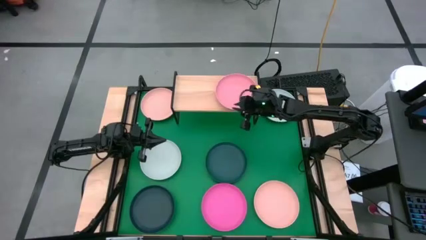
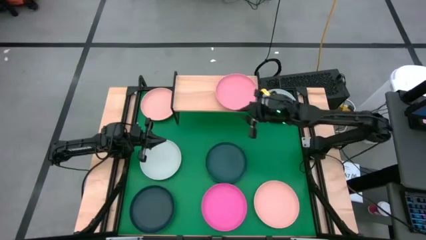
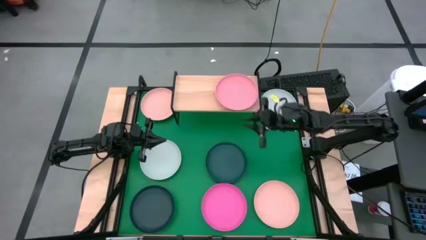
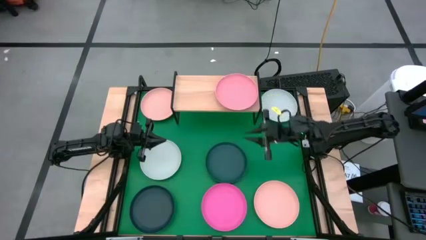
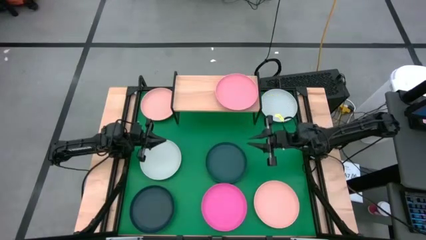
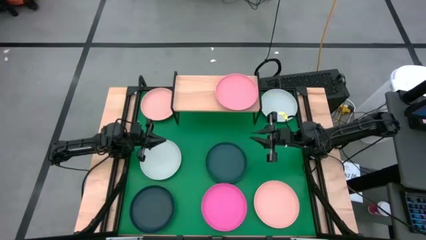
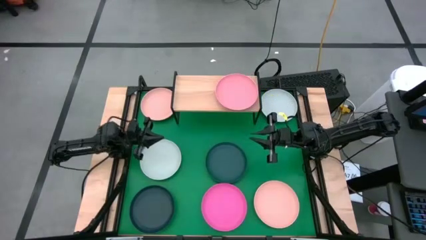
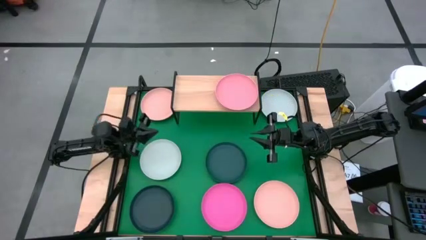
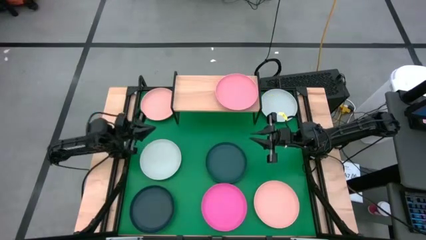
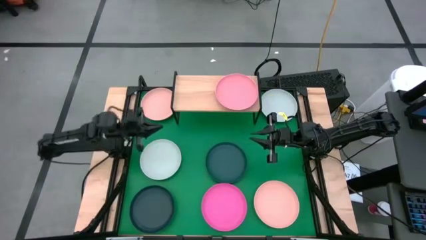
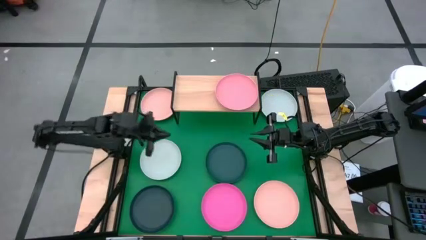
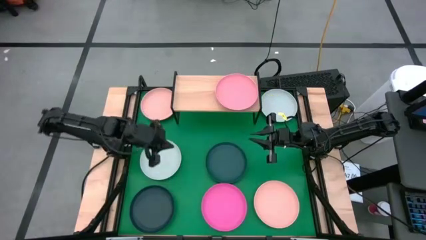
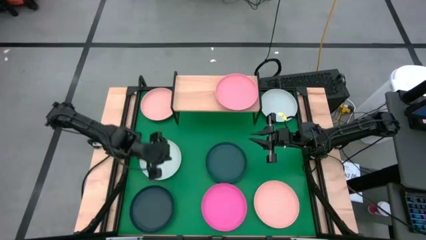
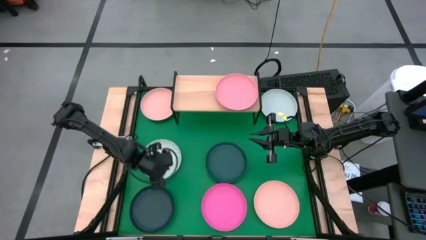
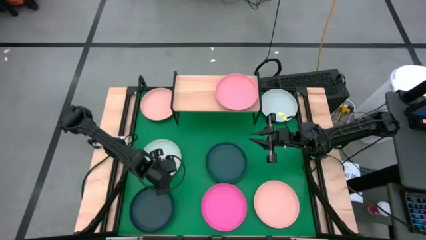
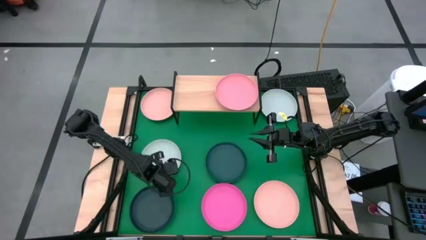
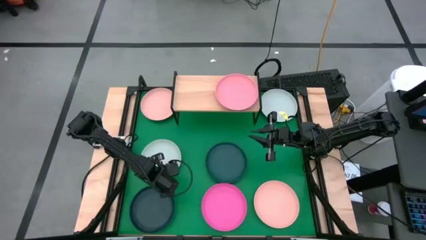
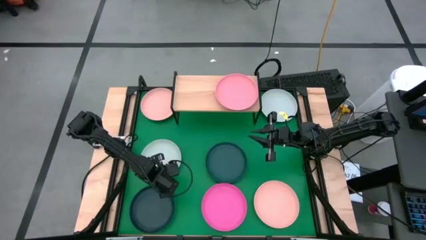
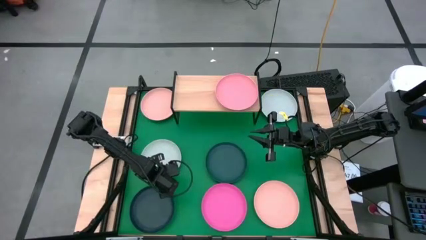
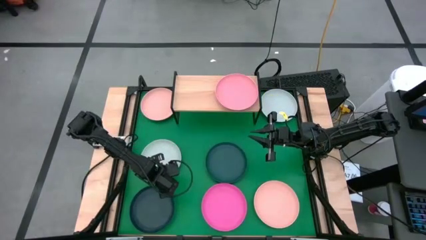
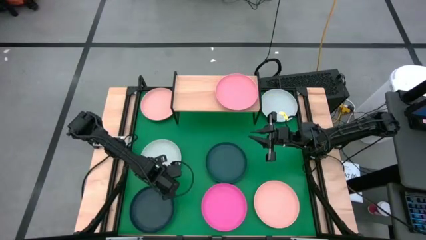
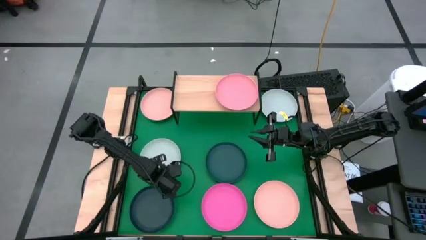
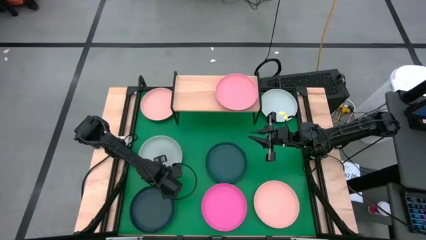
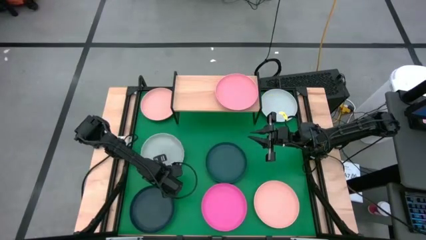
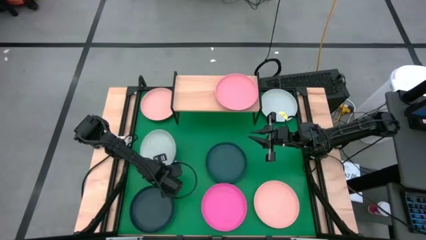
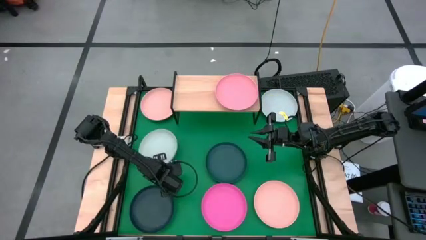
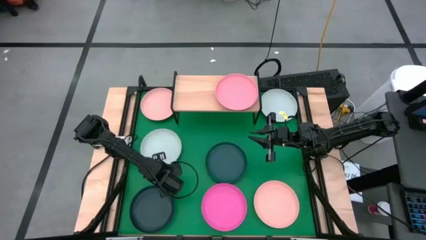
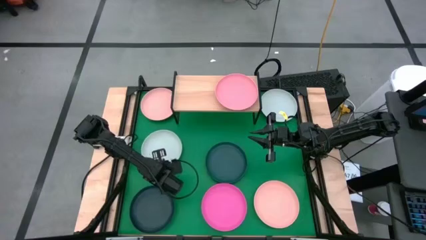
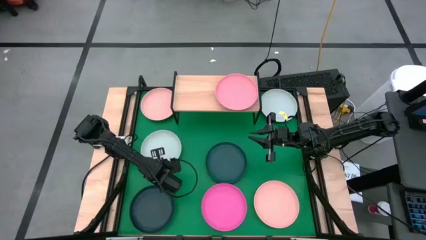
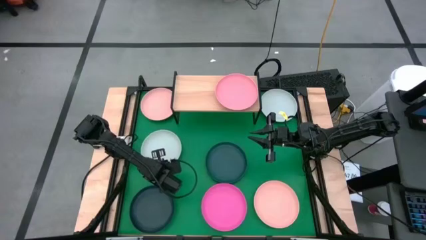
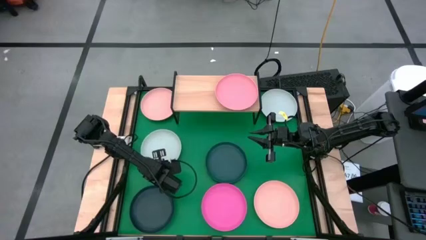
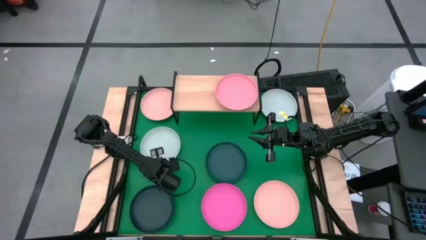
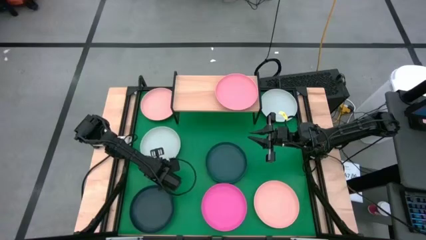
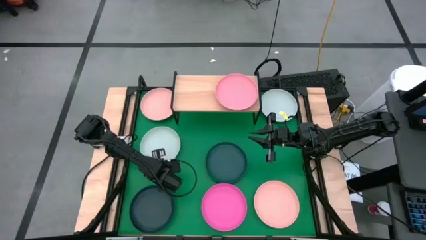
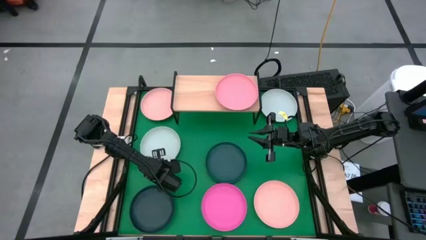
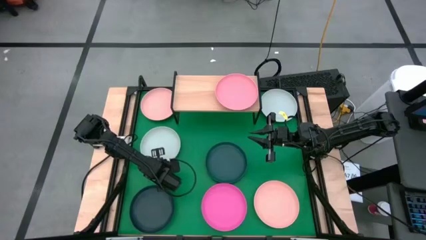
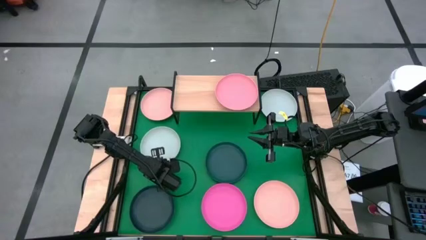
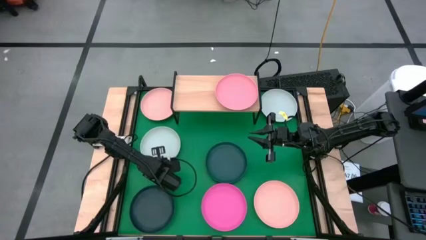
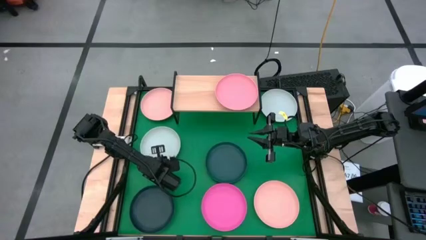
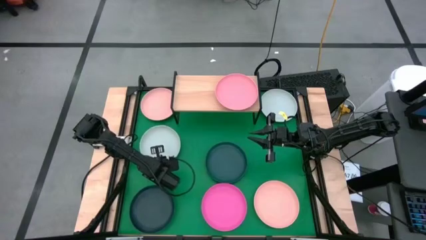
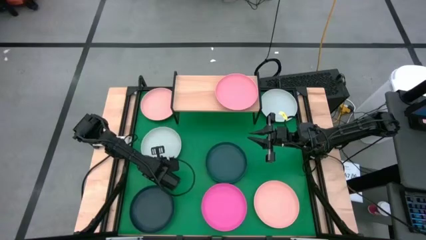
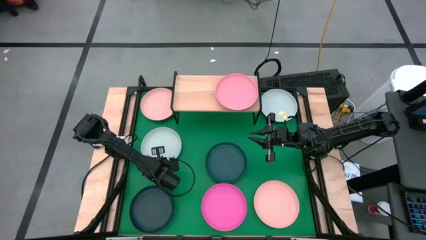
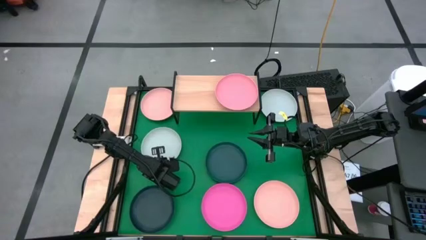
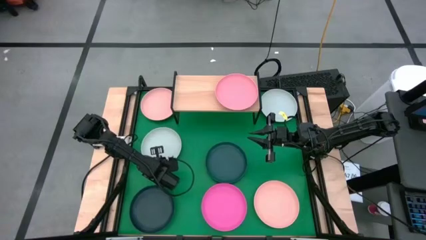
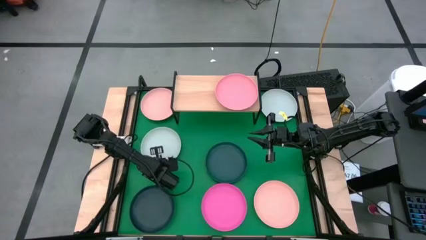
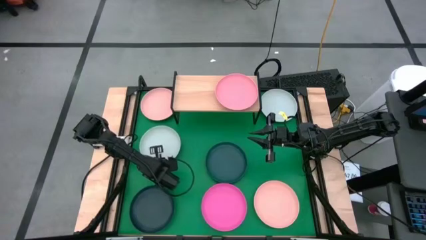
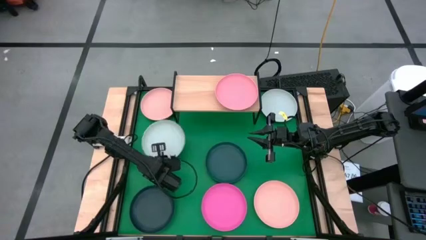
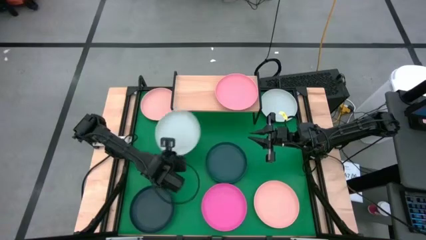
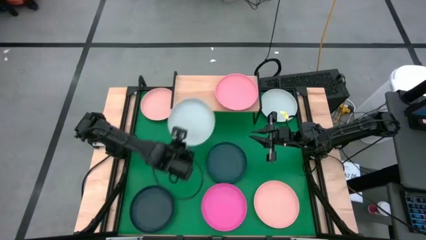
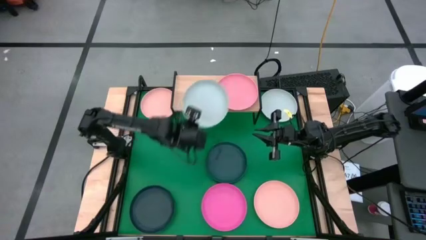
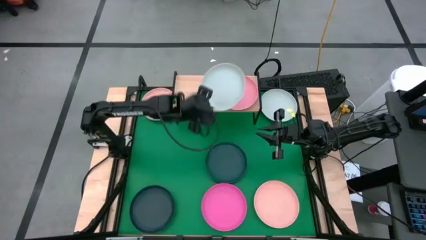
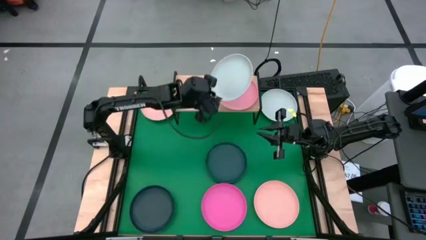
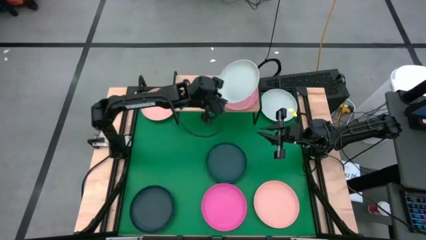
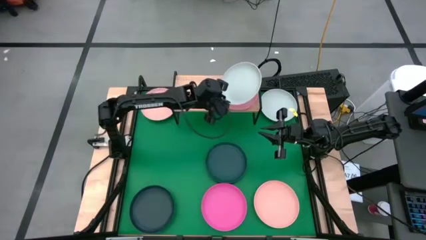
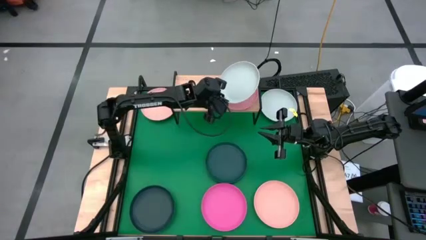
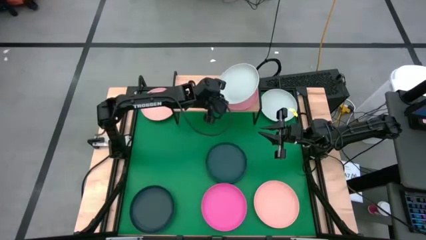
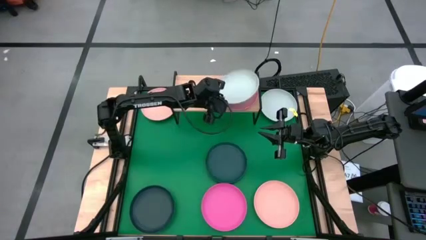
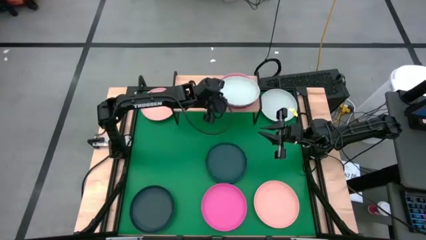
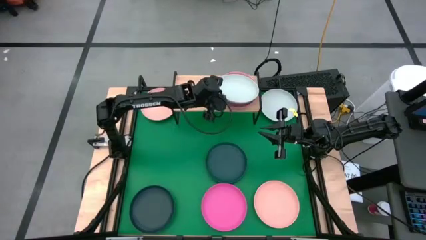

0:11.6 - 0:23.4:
Task: Place and stack plates onto a shelf
Stack the bottom white plate on top of the light pink plate on the shelf

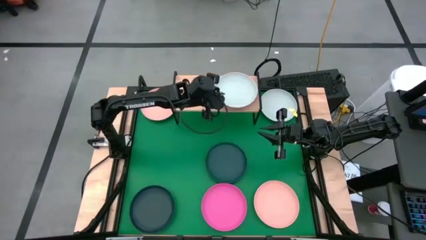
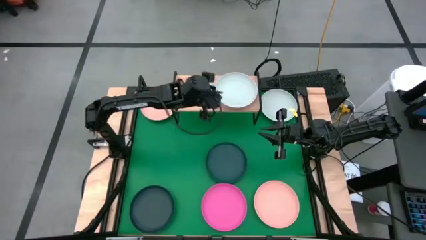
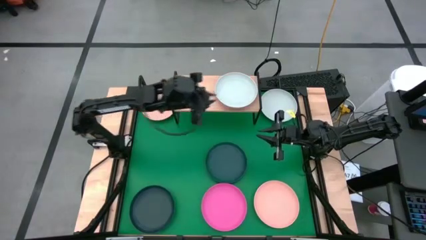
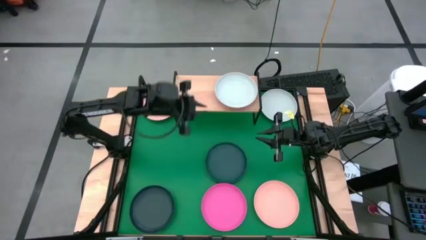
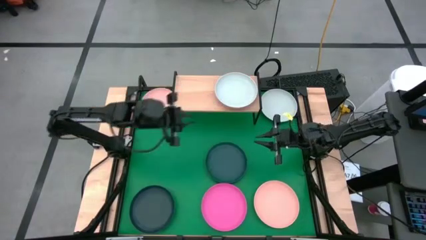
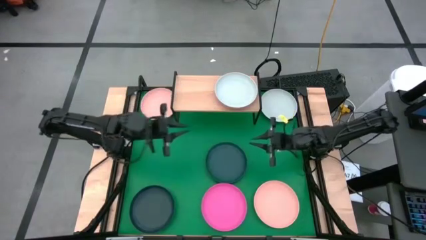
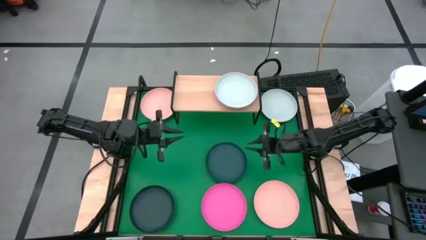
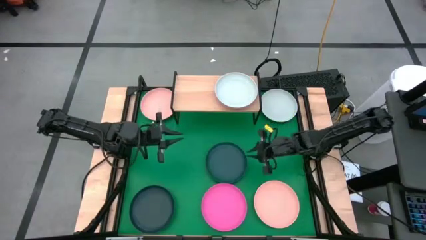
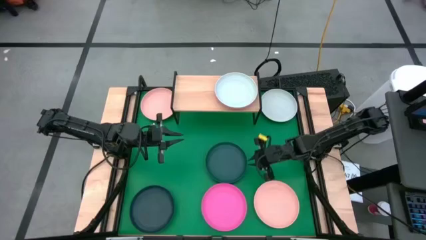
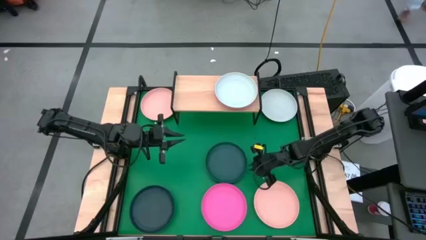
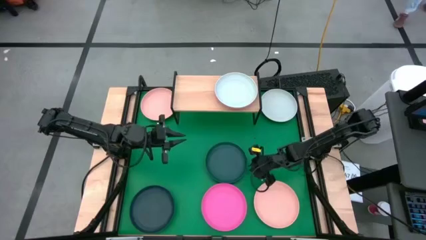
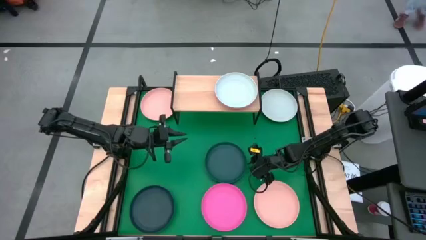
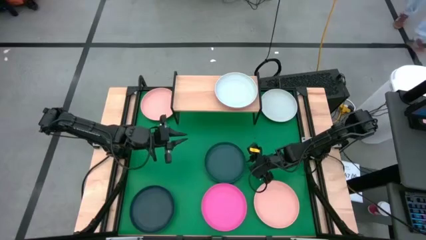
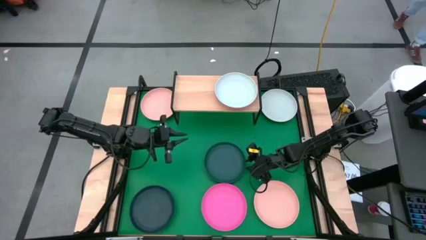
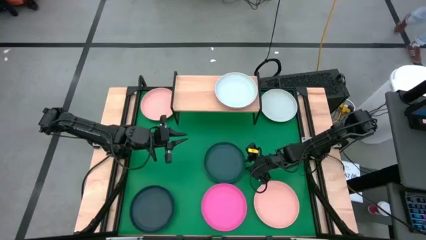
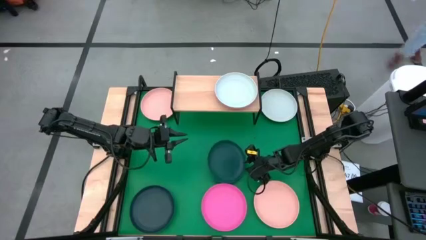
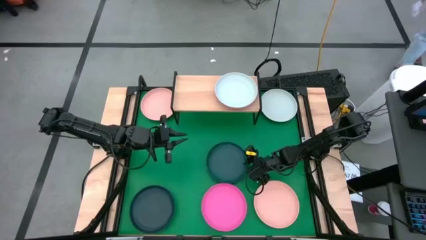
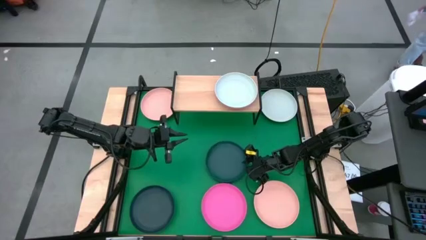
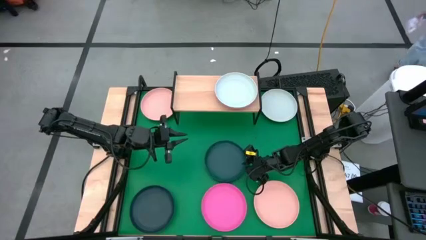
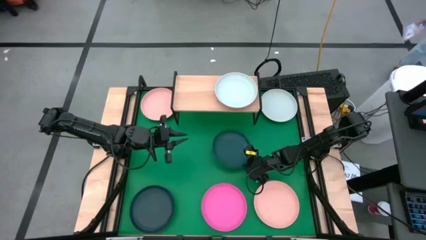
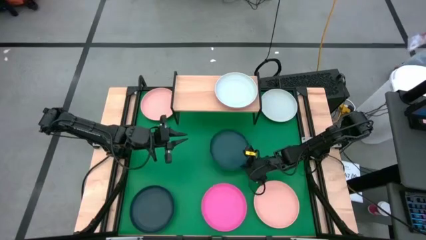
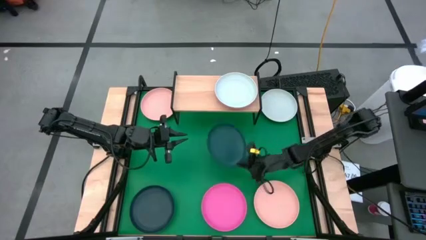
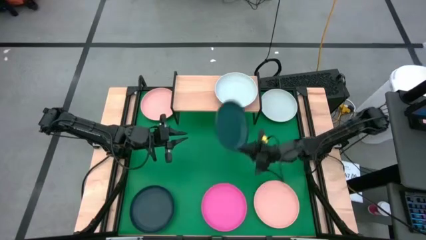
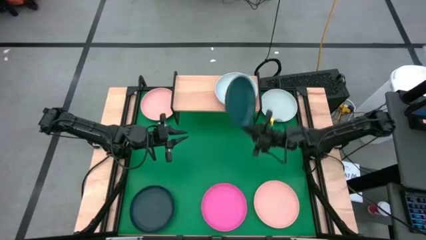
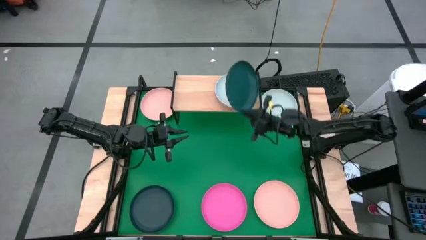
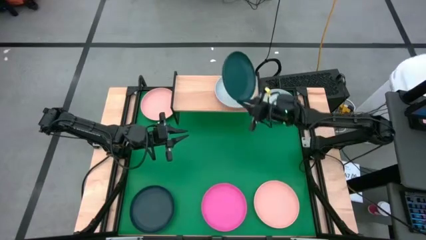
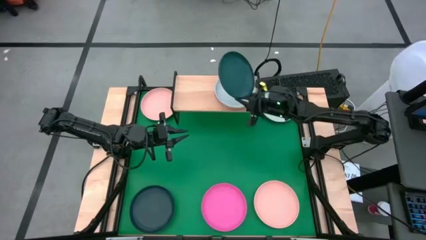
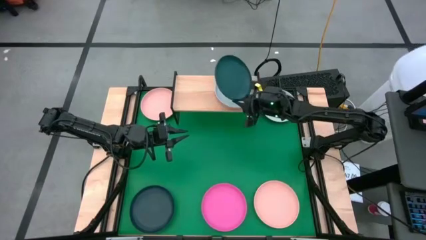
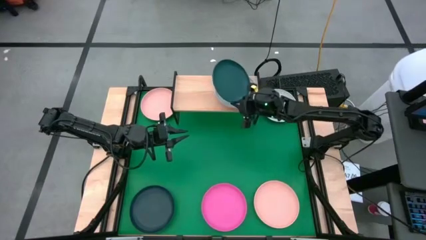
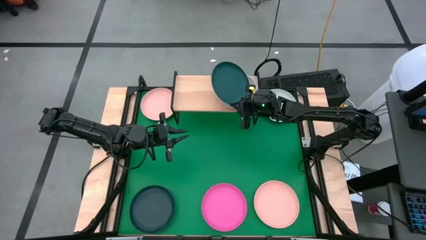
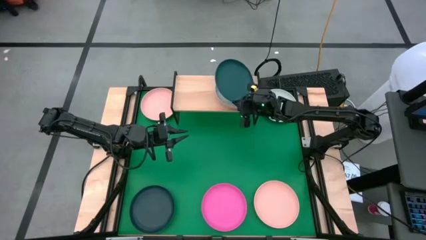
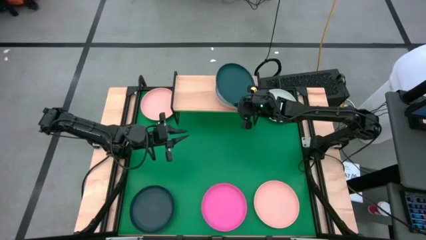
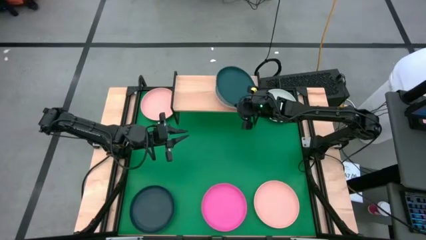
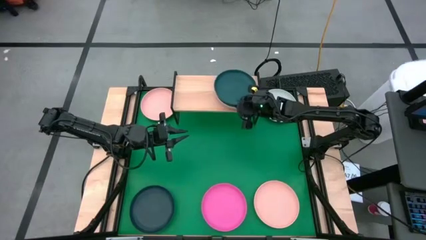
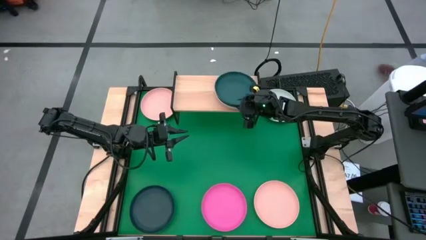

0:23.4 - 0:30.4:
Stack the green plate on top of the white plate on the shelf
